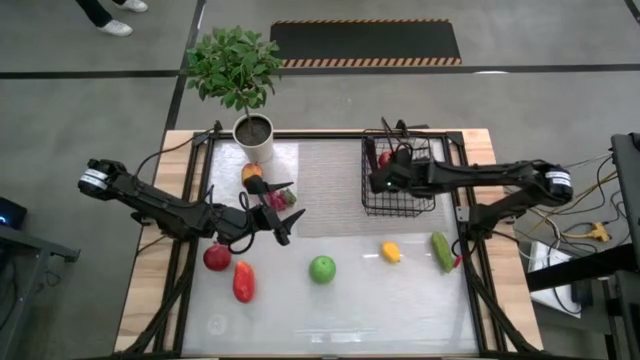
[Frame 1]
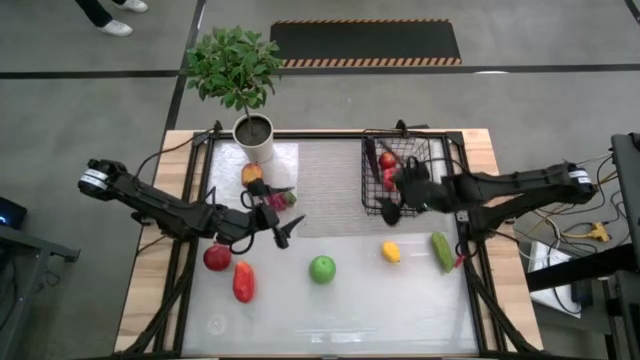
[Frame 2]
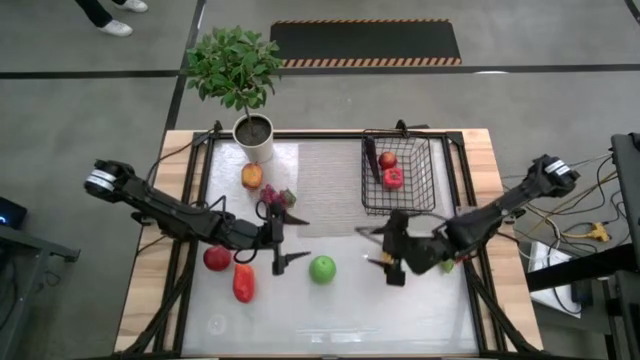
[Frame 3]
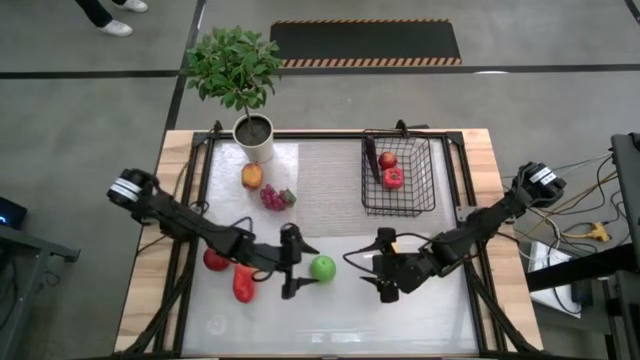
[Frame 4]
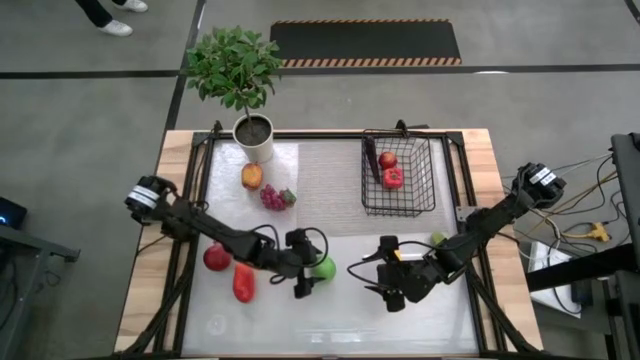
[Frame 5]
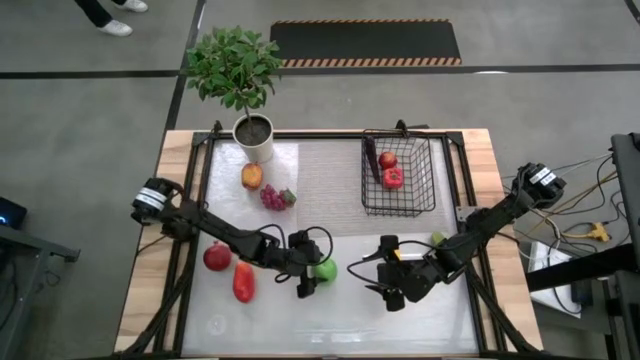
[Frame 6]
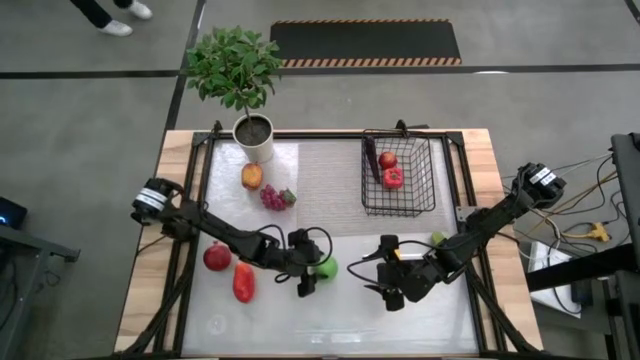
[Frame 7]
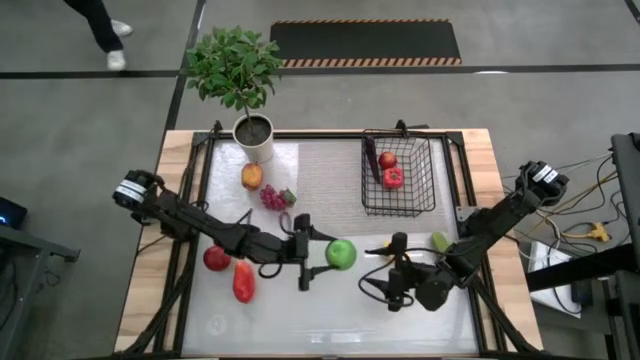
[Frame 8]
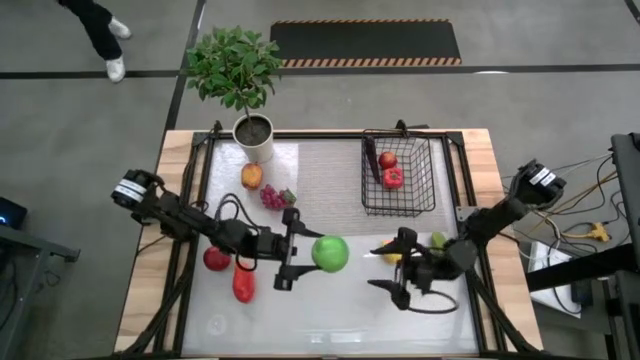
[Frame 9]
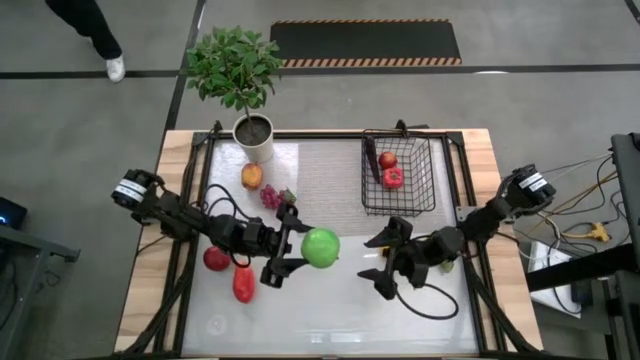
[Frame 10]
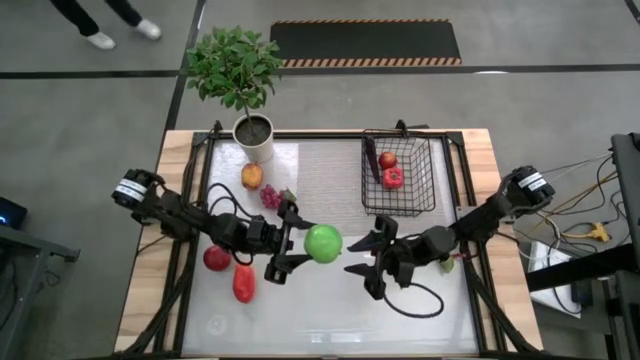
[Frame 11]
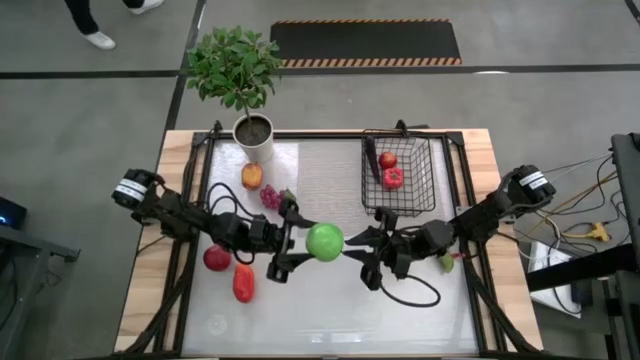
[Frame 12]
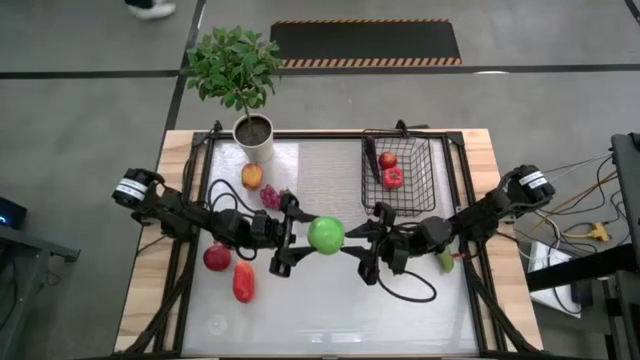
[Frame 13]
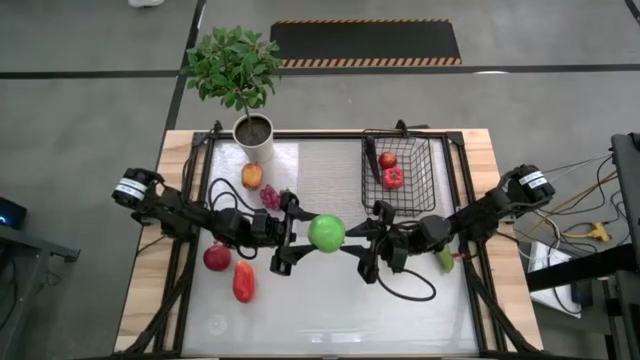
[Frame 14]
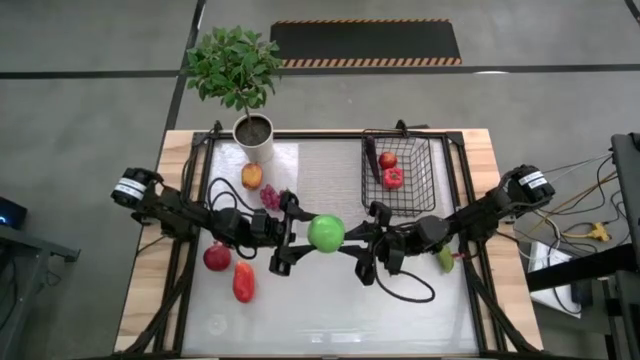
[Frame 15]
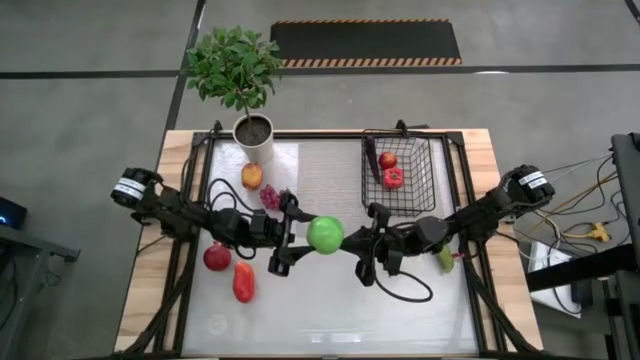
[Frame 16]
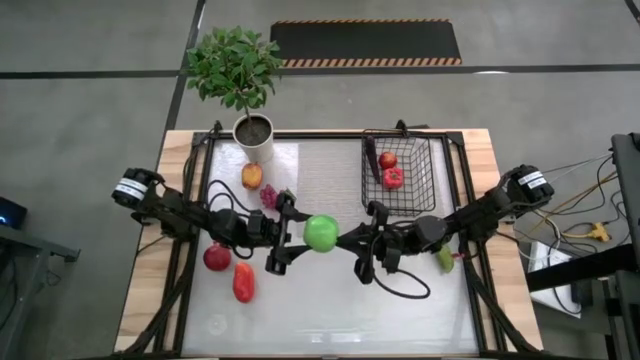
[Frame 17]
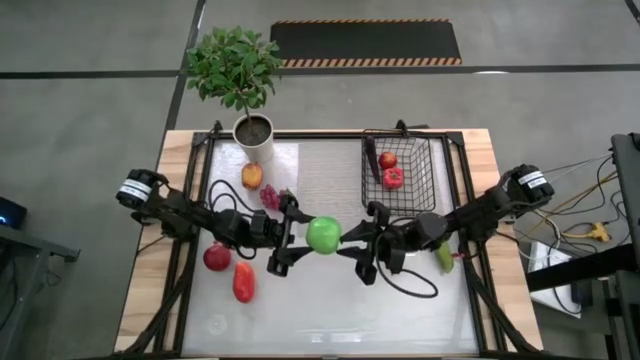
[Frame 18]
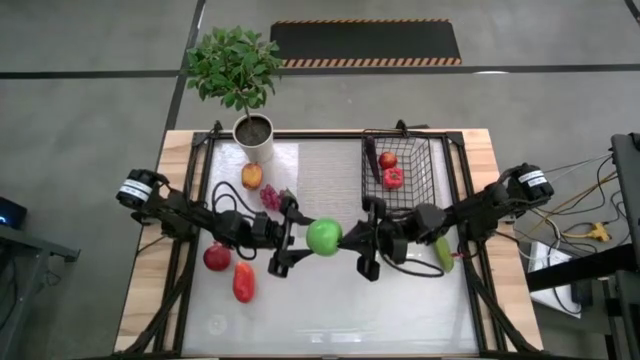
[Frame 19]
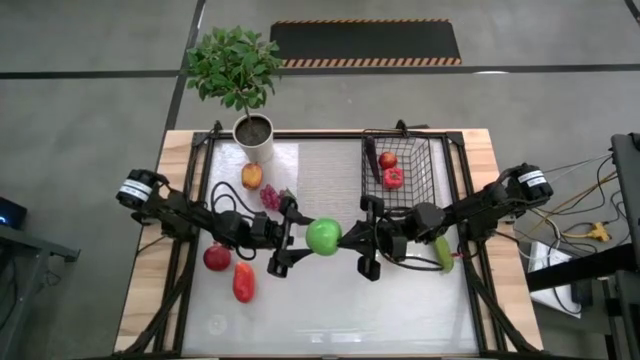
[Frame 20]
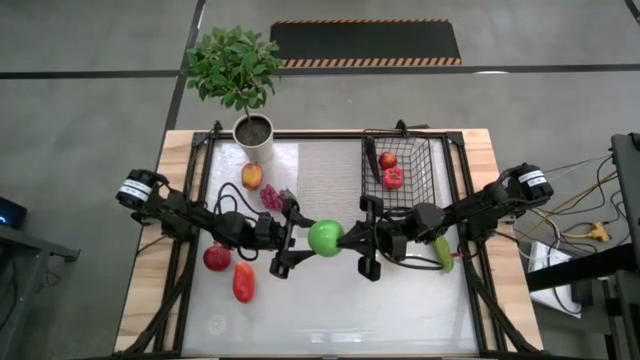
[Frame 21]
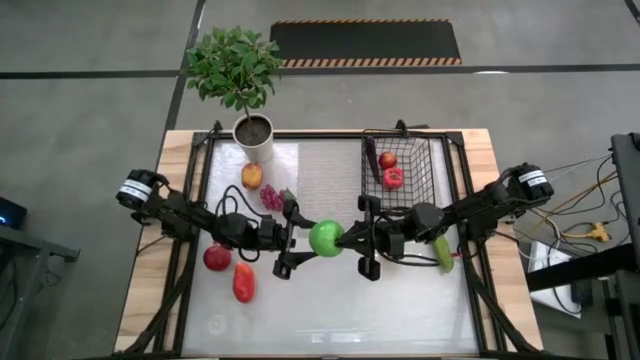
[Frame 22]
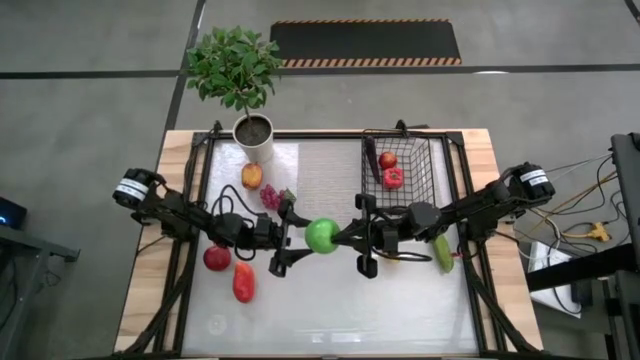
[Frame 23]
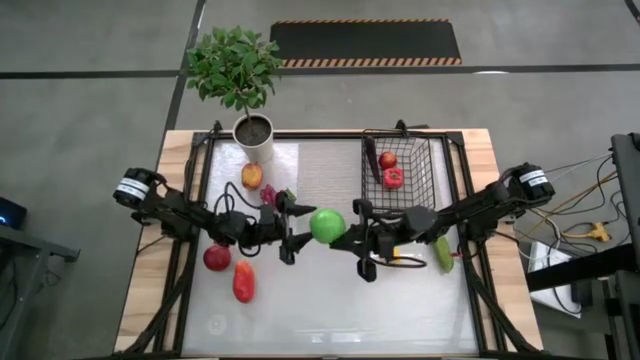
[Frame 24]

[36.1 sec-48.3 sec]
Task: Build produce basket
Put the green apple into the wire basket

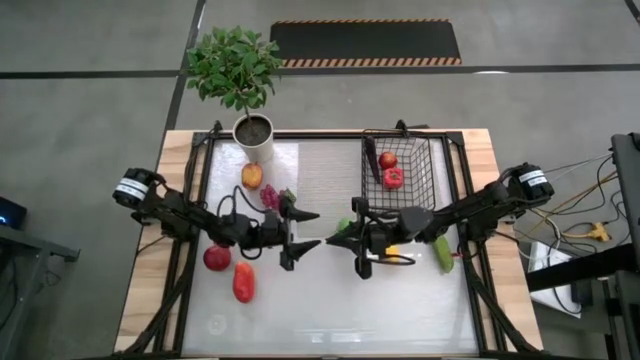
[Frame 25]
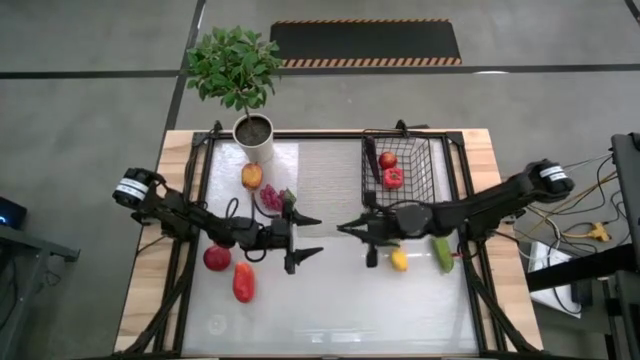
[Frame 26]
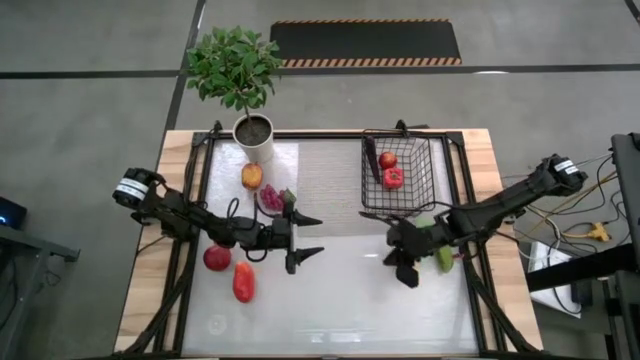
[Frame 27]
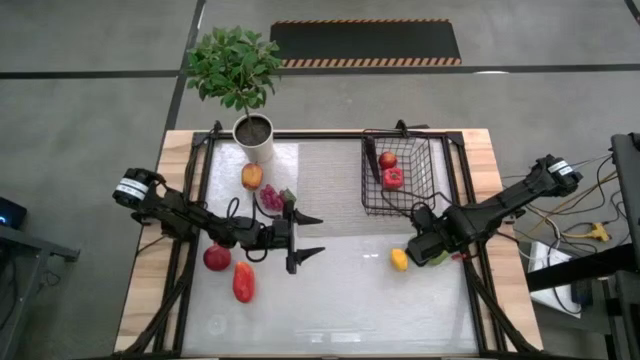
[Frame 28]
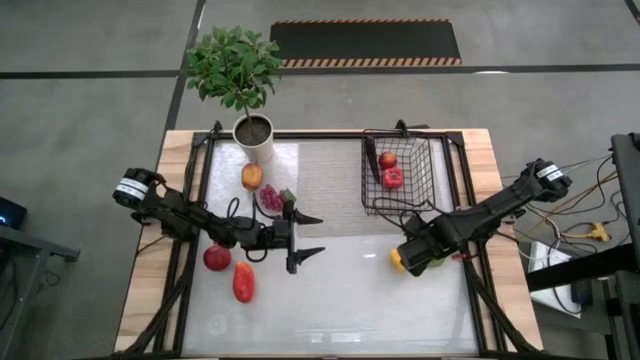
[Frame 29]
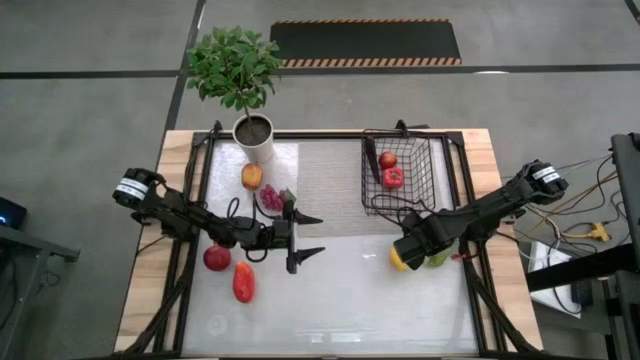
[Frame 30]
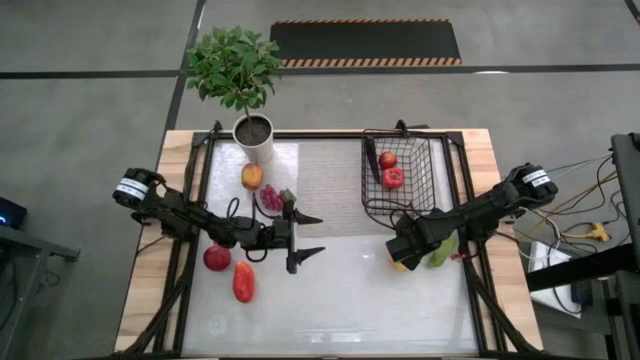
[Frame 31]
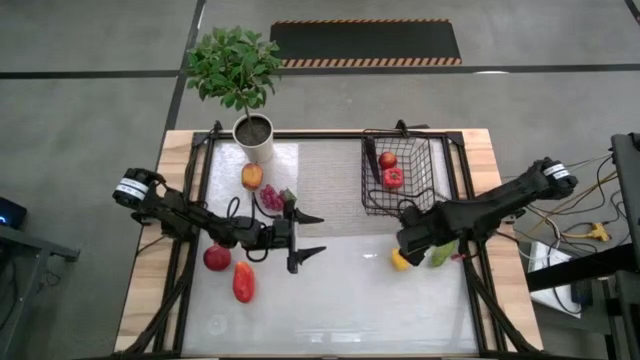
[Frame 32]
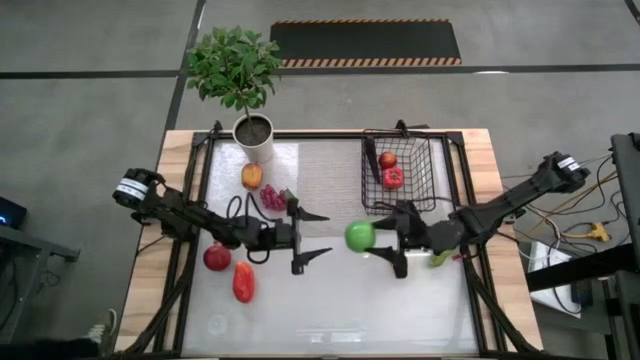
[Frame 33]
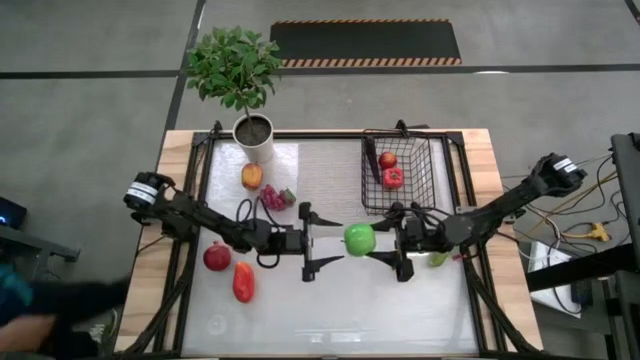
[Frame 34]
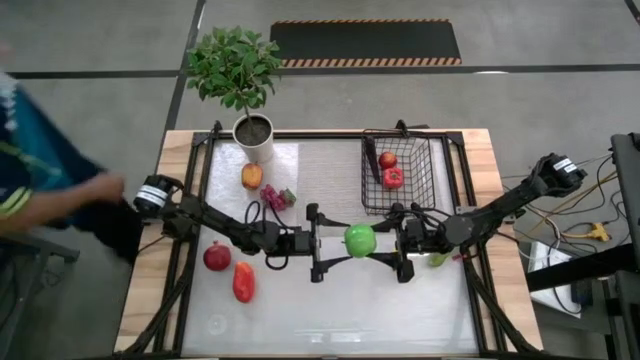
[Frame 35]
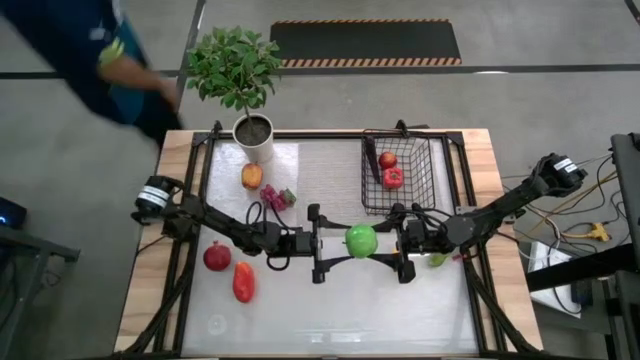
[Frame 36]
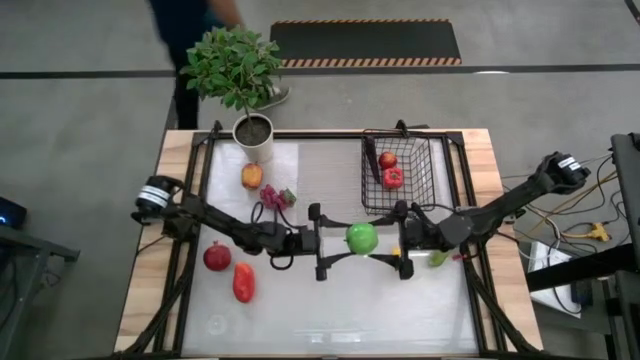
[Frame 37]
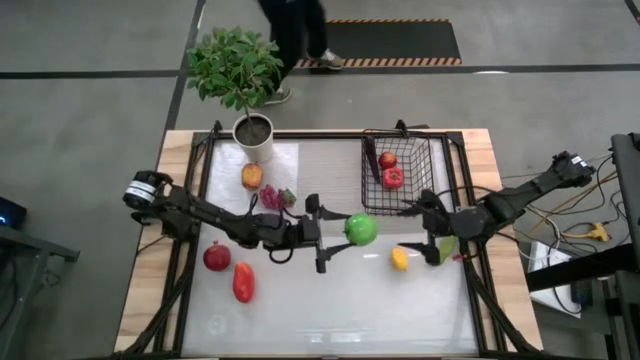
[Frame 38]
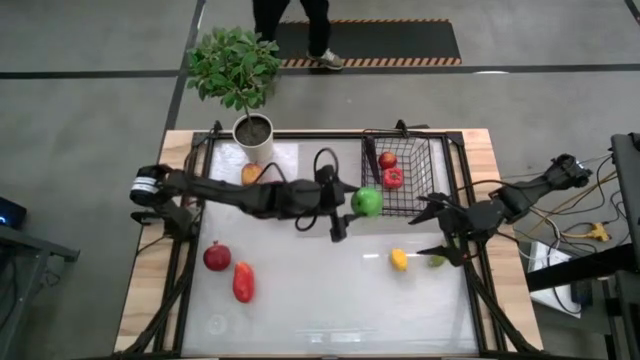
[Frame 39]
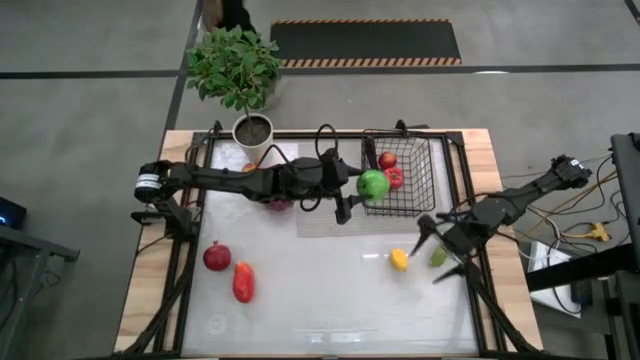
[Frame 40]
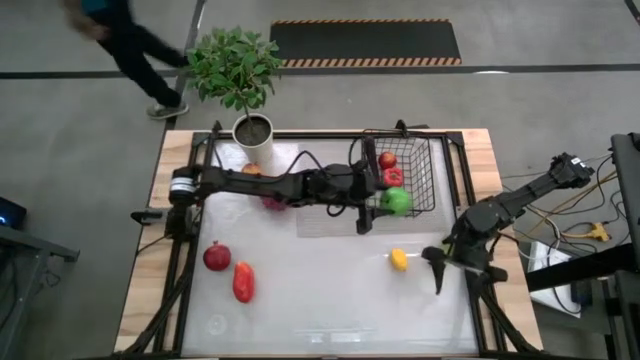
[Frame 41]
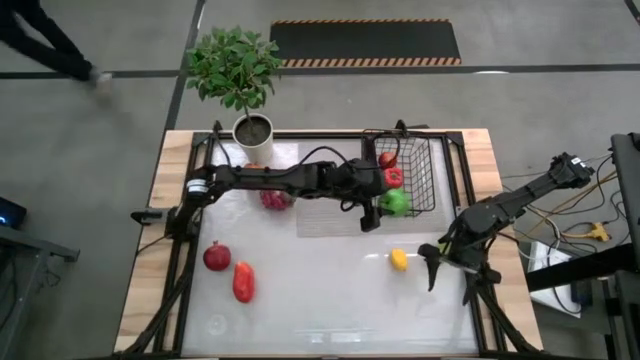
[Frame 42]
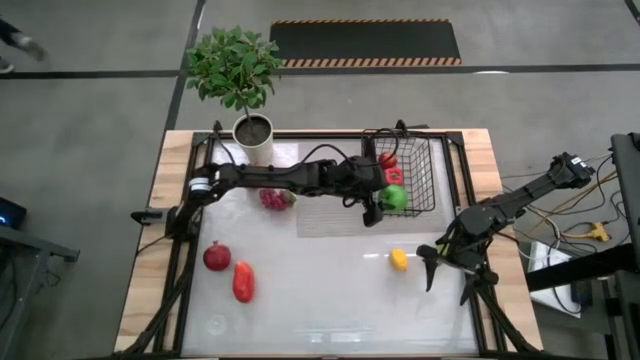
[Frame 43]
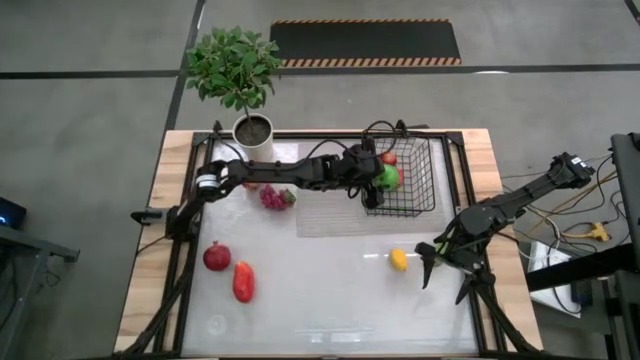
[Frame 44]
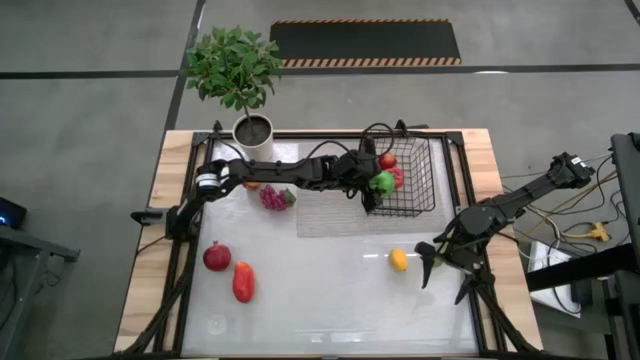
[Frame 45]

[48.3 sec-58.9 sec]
Put the green apple into the wire basket
